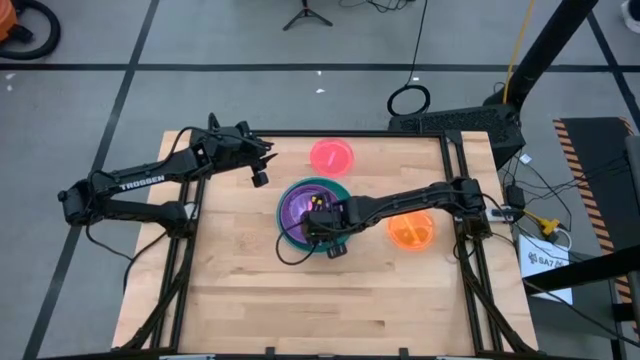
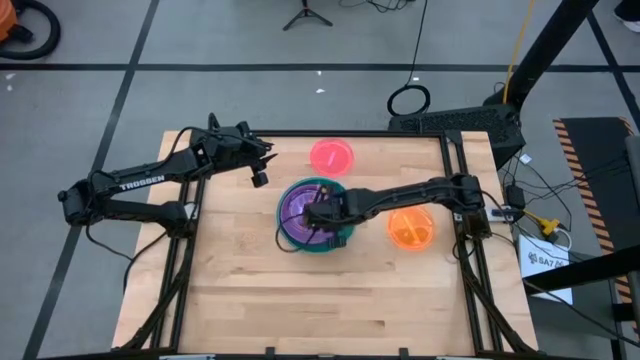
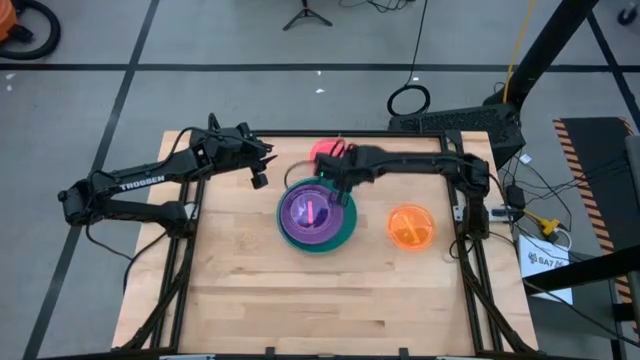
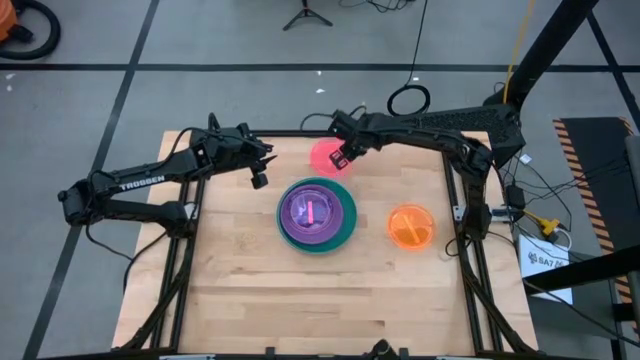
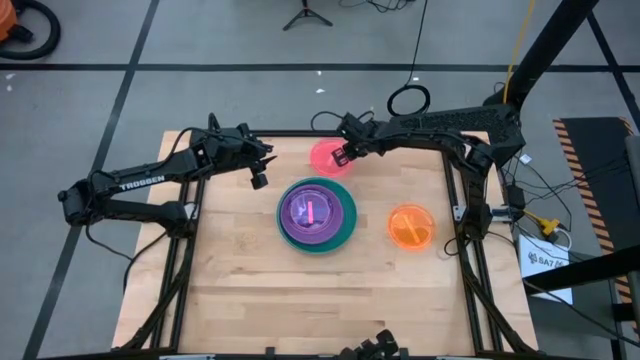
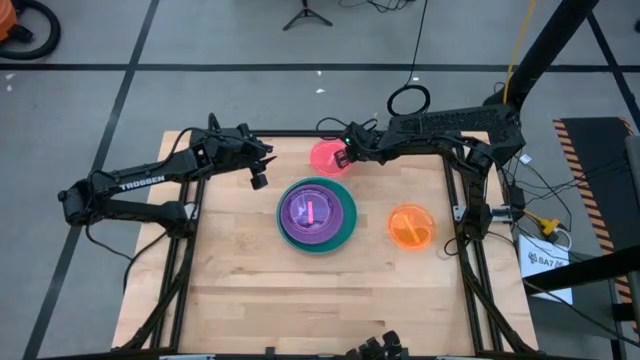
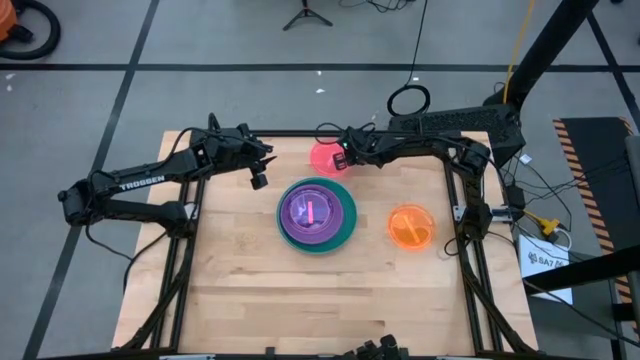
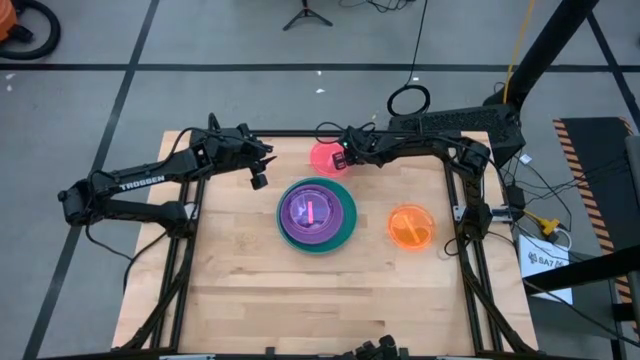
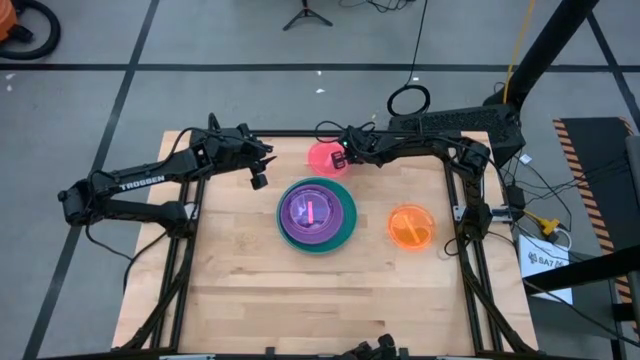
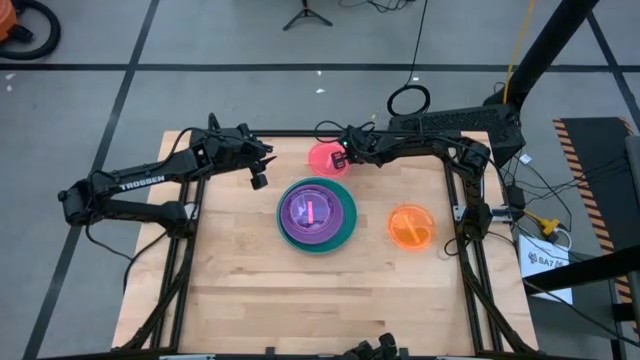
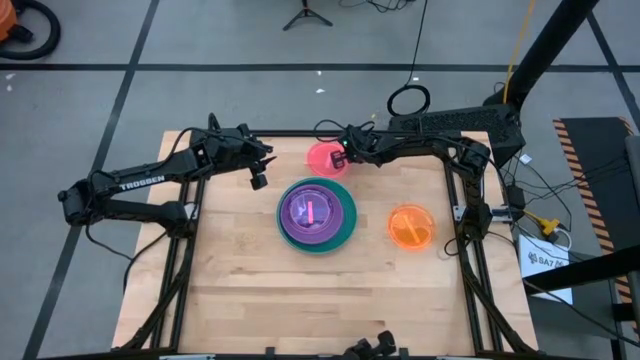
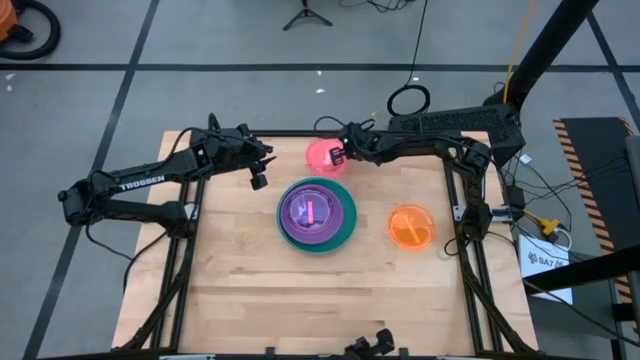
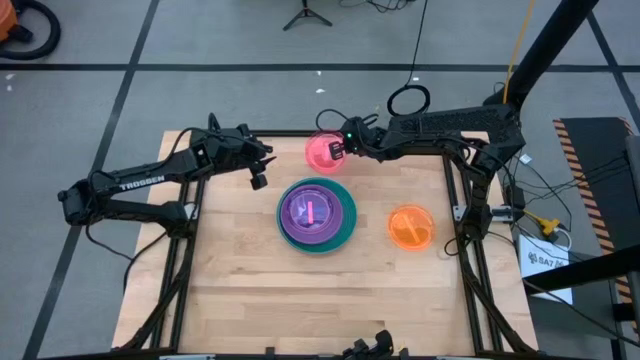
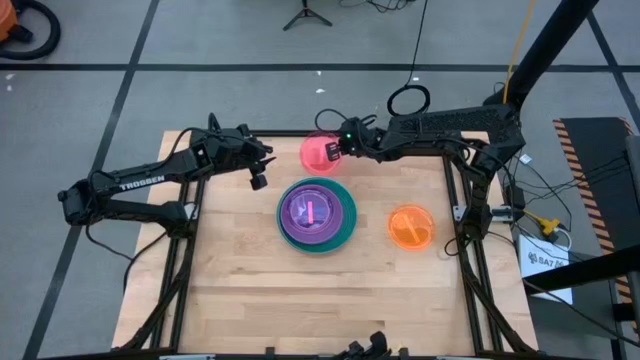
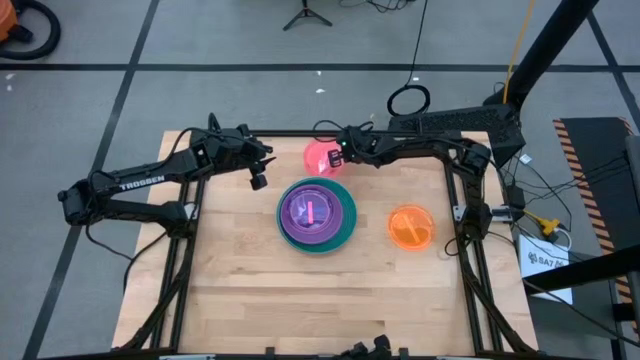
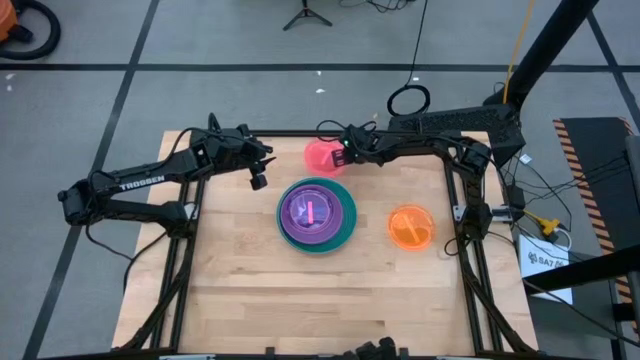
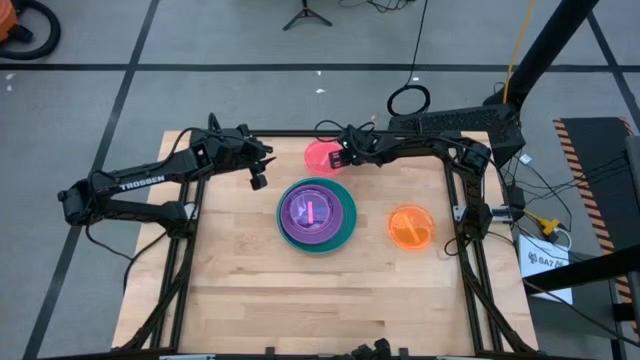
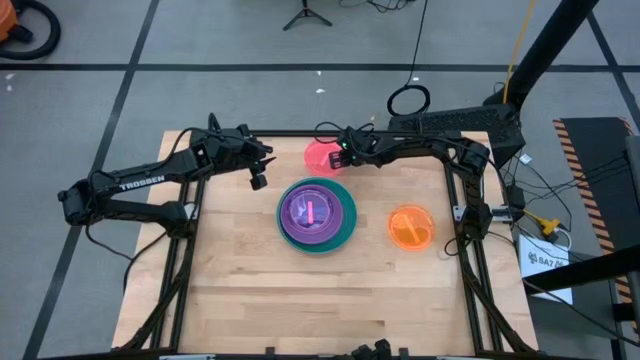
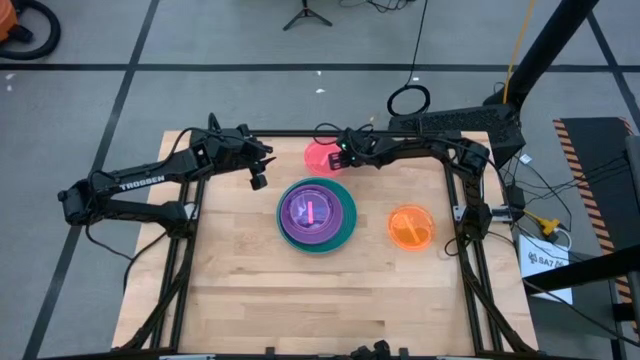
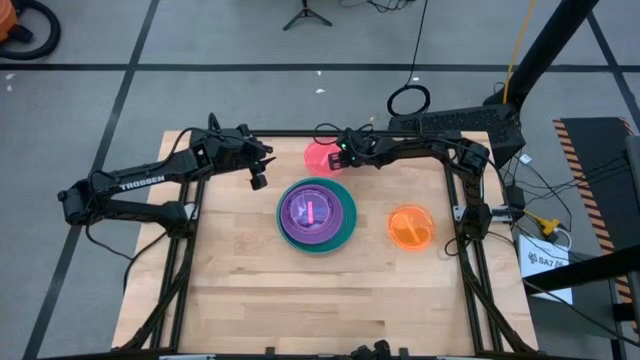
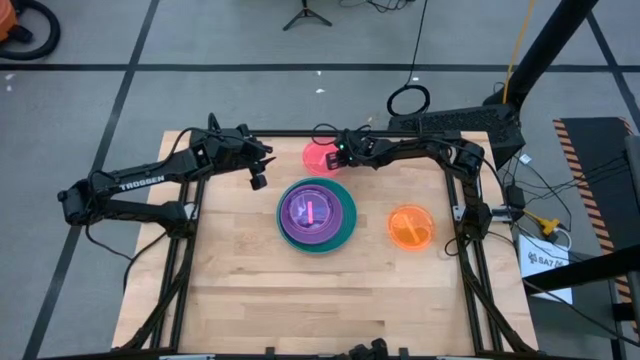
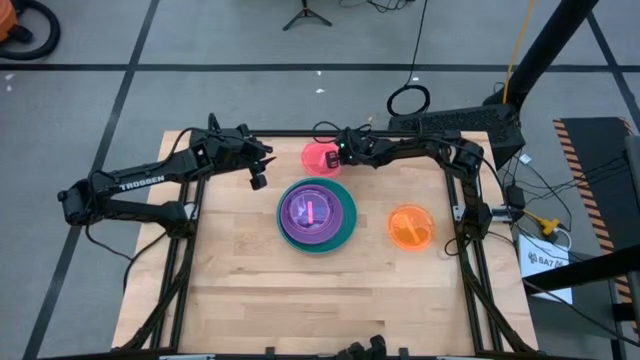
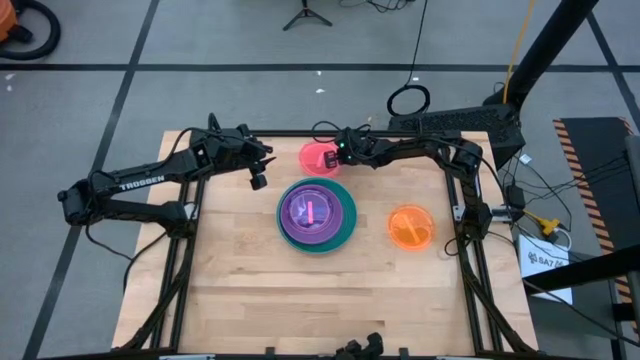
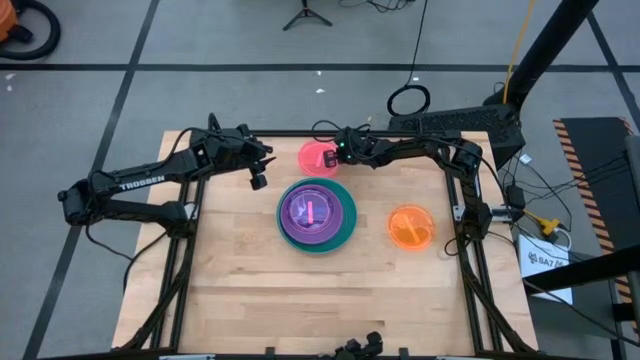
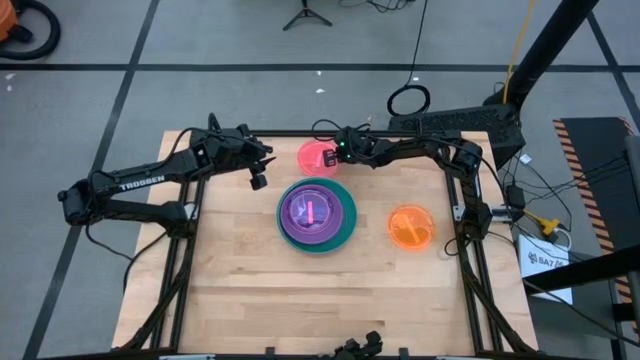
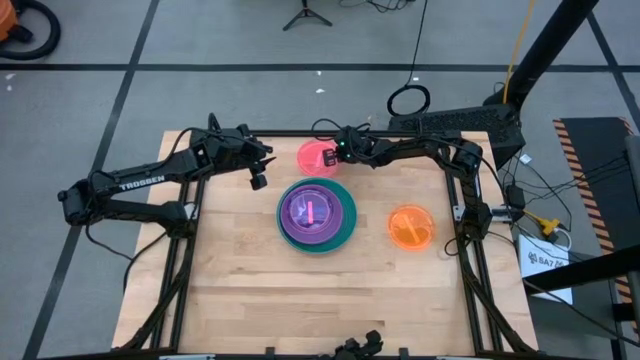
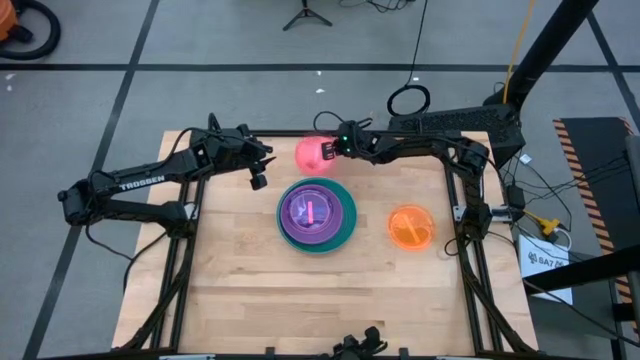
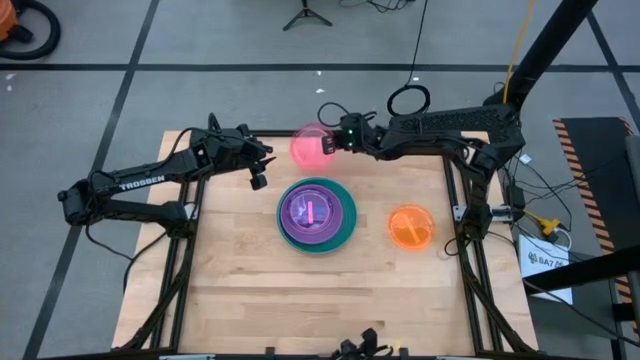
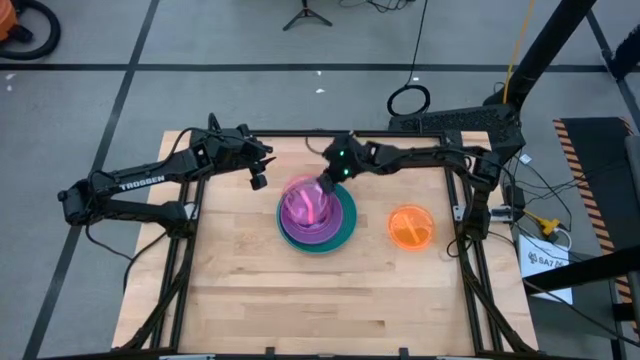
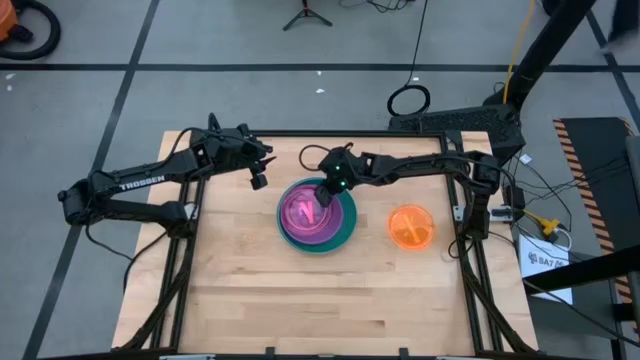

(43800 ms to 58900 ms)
Task: Stack plastic plates
Stack the pink plate on the pink plate

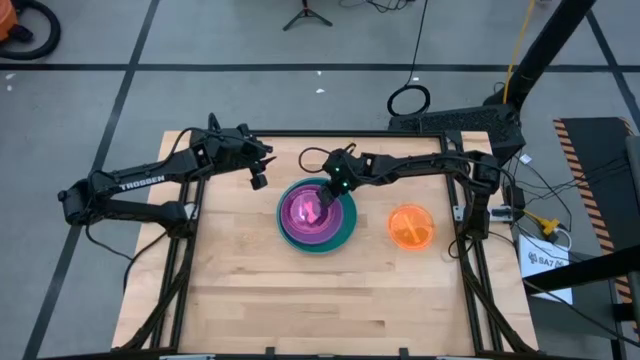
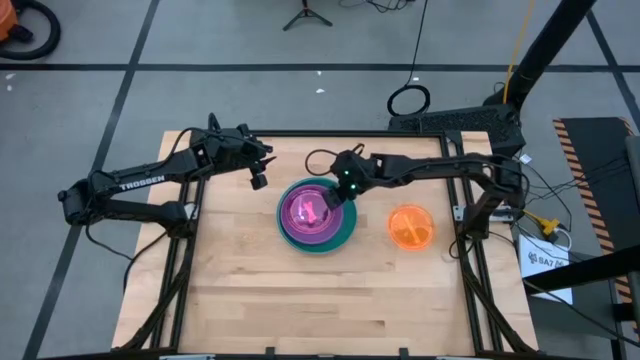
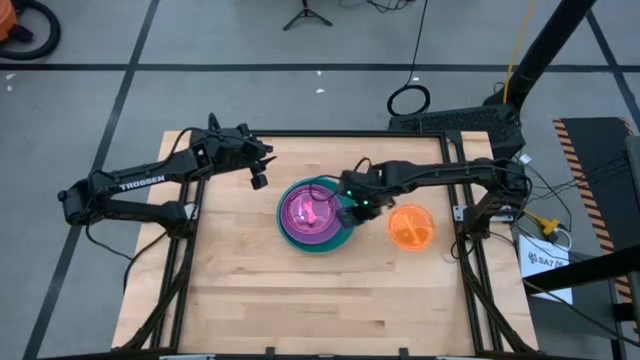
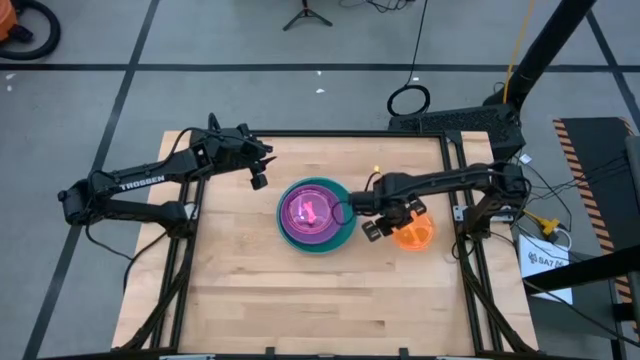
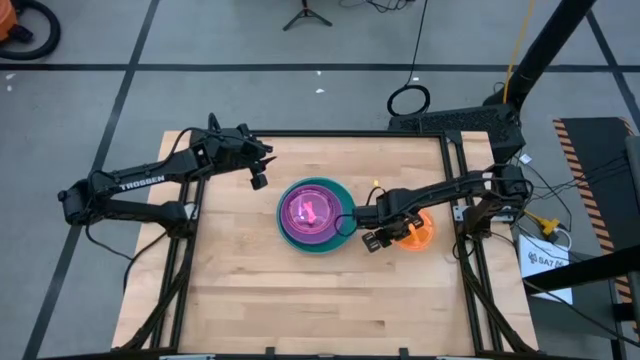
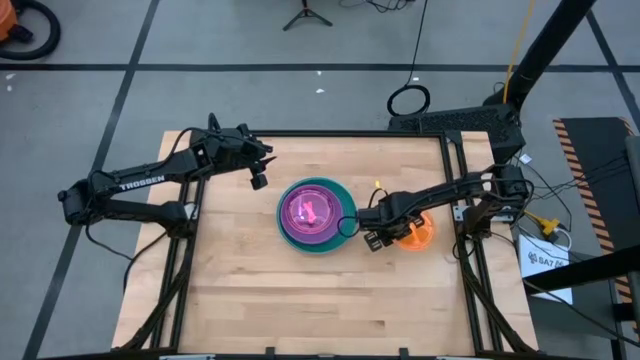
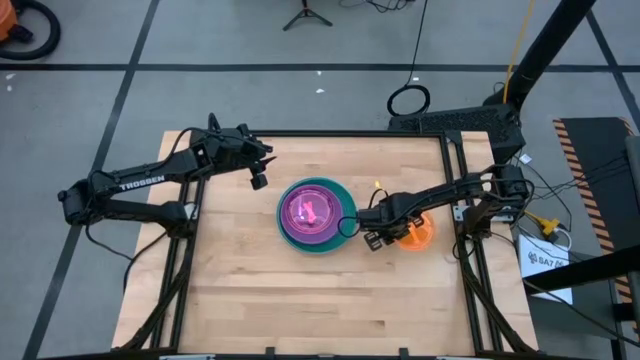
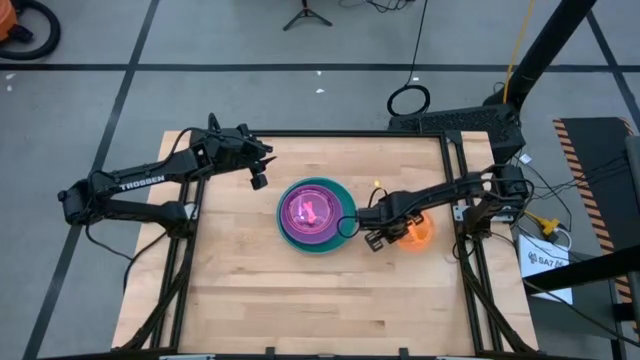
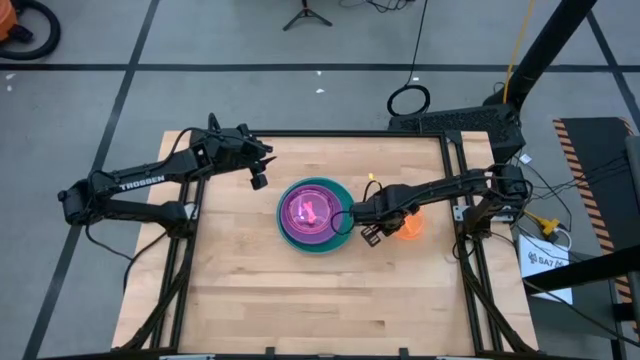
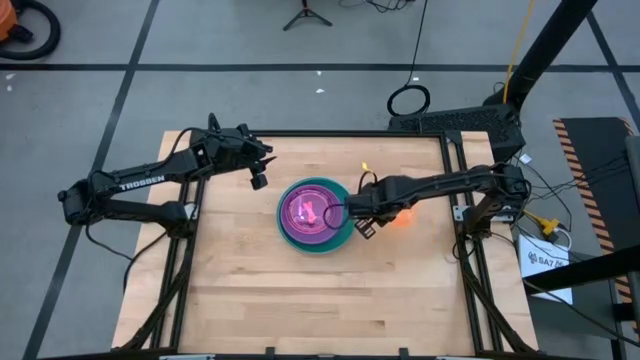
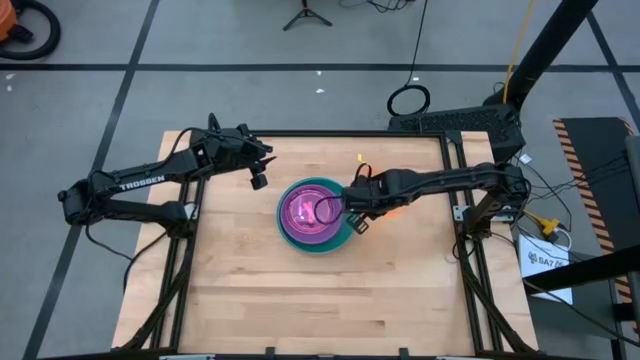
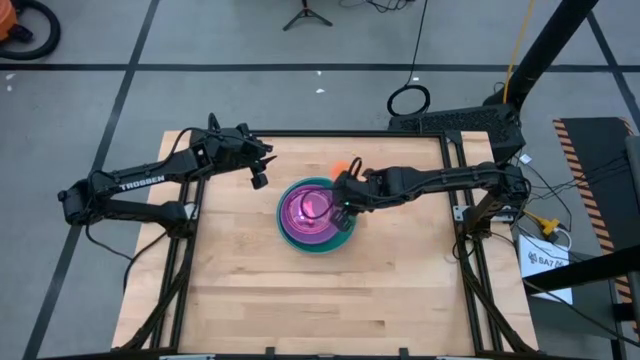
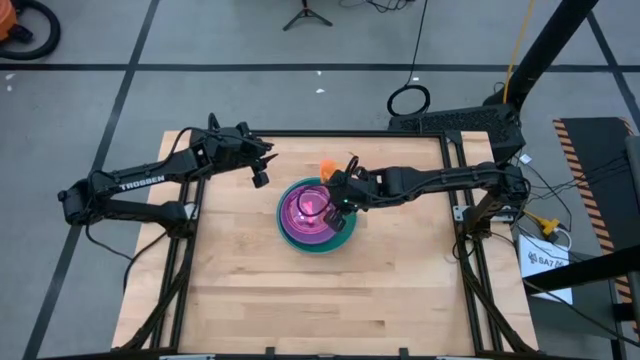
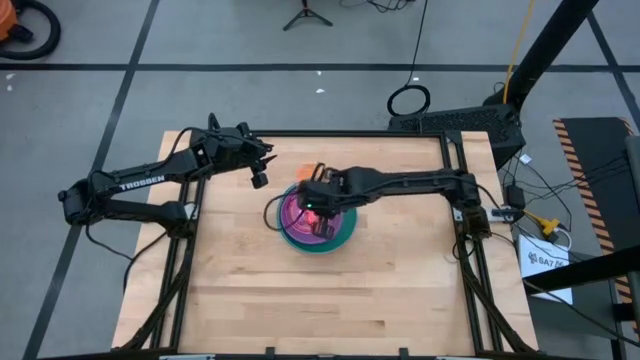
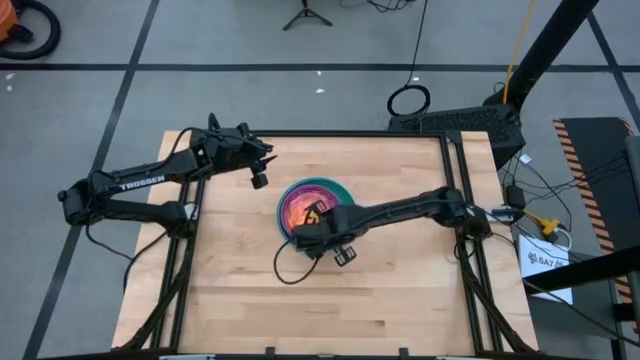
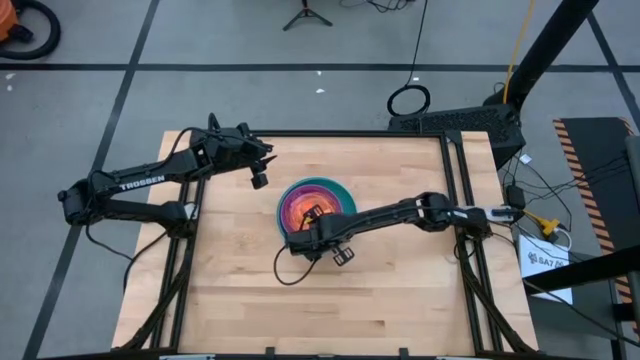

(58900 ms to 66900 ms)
Stack the orange plate on the pink plate
